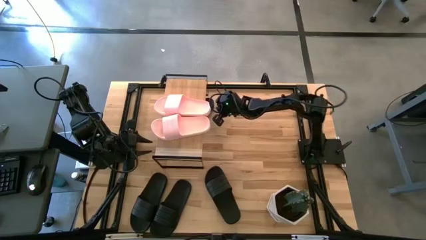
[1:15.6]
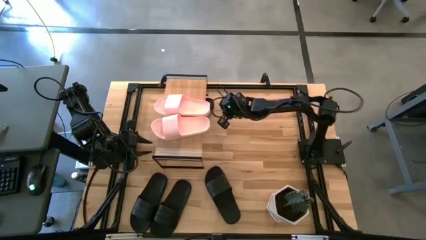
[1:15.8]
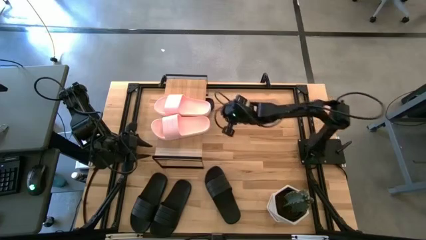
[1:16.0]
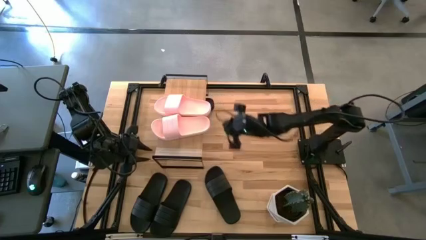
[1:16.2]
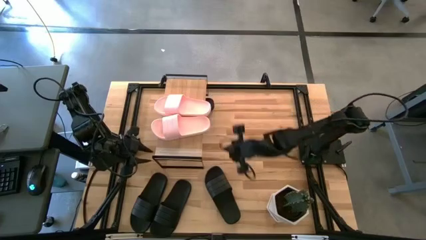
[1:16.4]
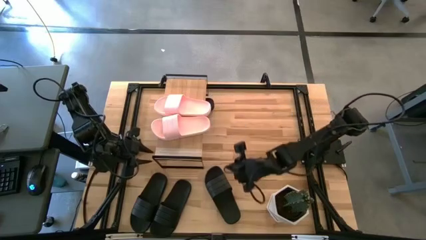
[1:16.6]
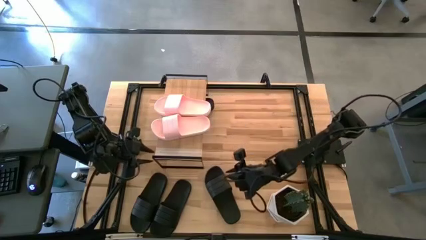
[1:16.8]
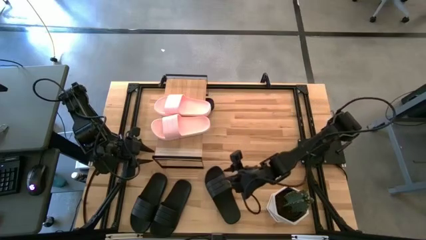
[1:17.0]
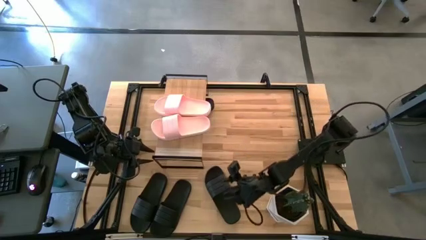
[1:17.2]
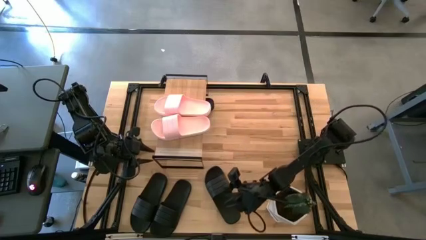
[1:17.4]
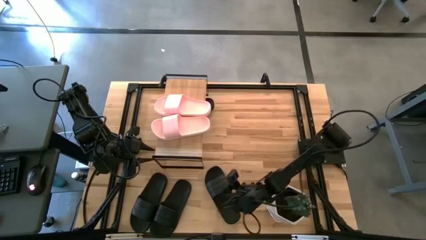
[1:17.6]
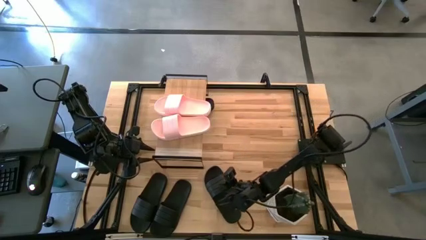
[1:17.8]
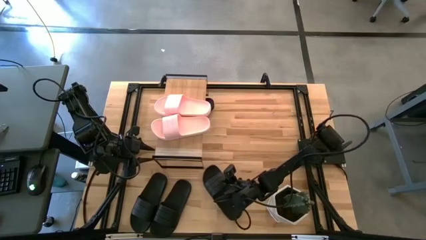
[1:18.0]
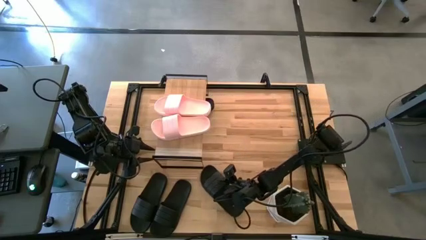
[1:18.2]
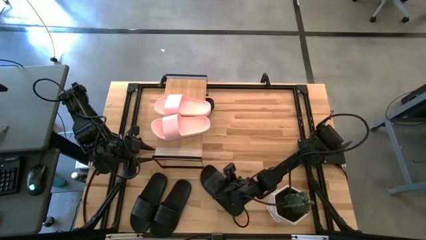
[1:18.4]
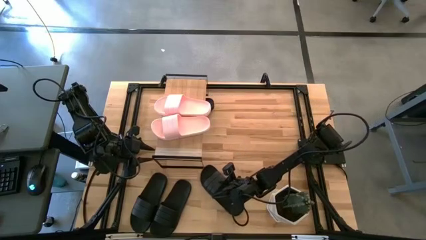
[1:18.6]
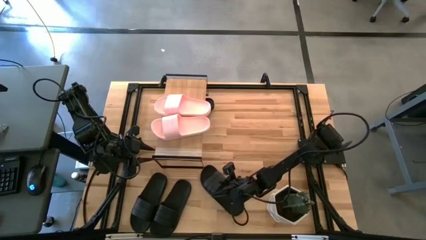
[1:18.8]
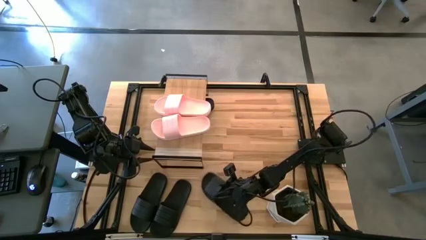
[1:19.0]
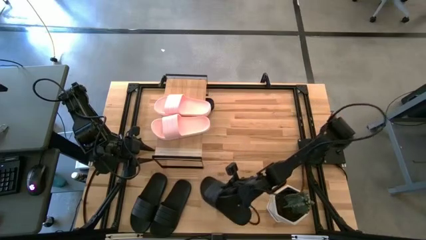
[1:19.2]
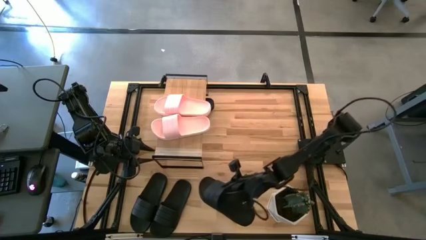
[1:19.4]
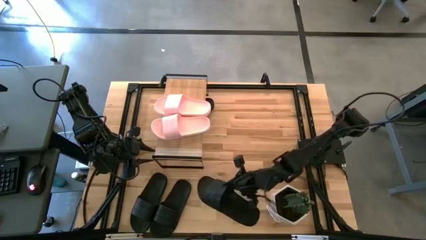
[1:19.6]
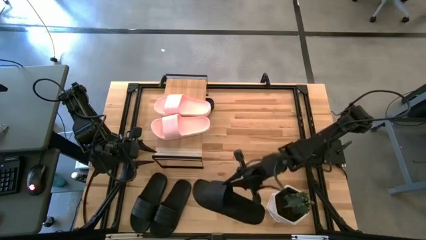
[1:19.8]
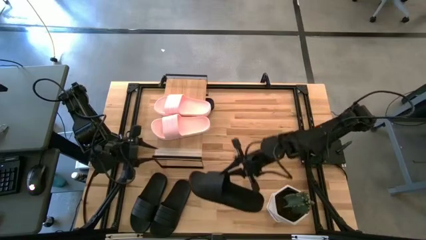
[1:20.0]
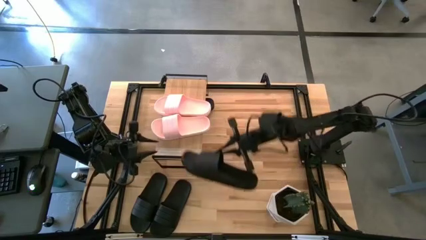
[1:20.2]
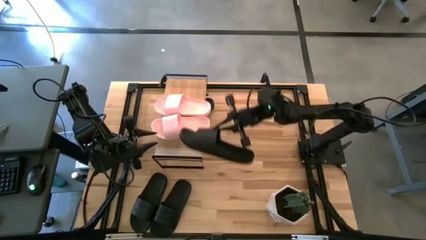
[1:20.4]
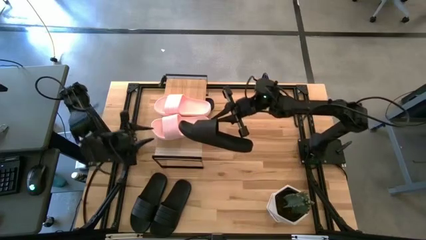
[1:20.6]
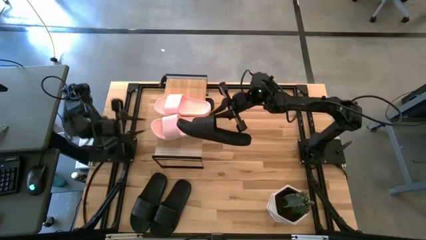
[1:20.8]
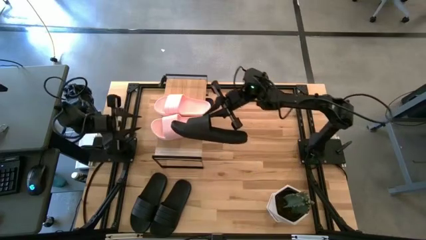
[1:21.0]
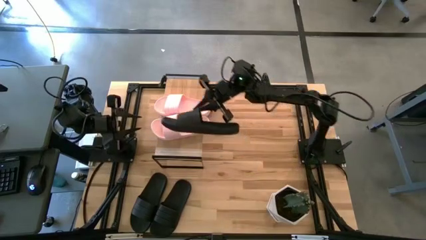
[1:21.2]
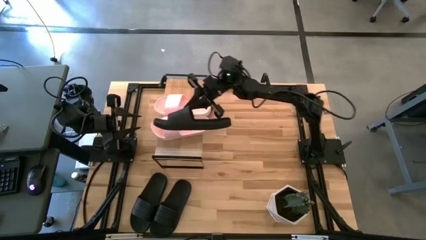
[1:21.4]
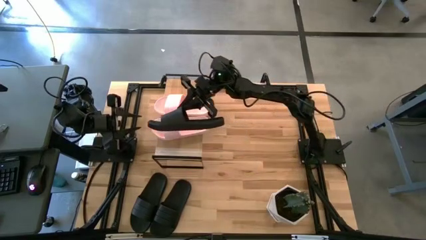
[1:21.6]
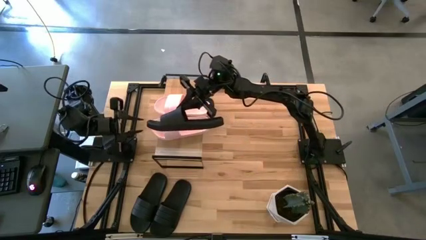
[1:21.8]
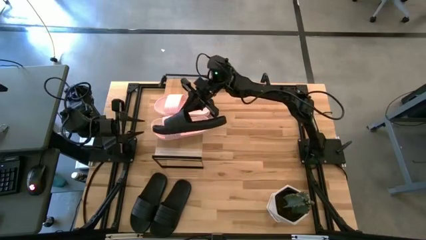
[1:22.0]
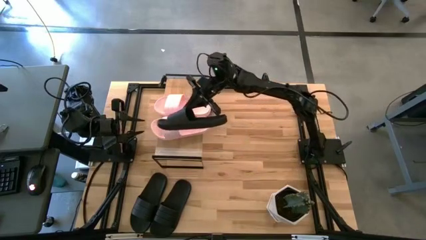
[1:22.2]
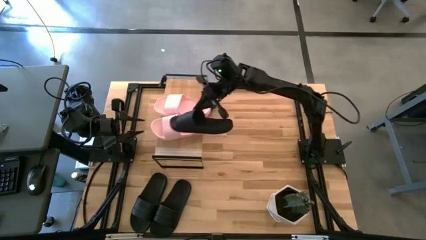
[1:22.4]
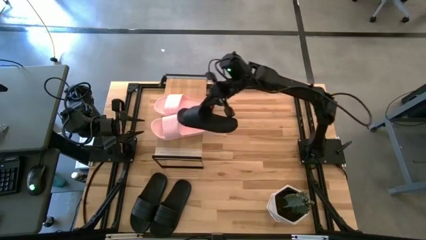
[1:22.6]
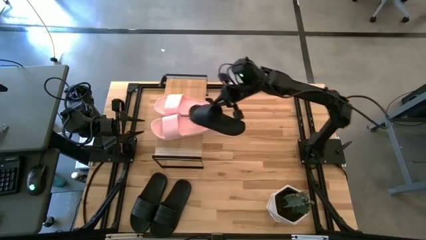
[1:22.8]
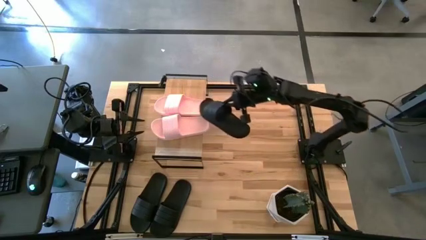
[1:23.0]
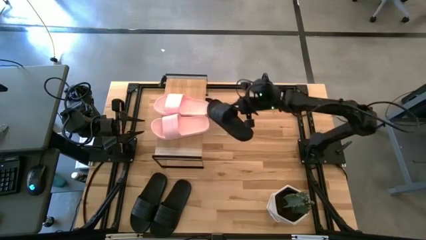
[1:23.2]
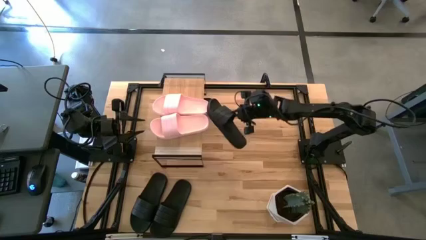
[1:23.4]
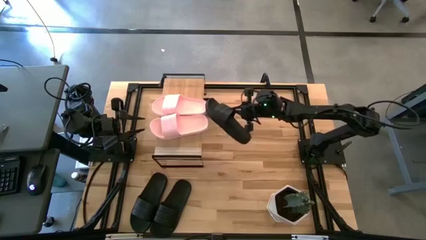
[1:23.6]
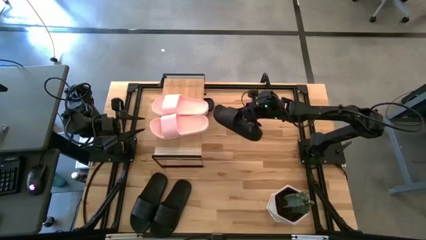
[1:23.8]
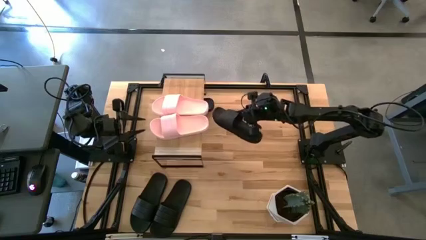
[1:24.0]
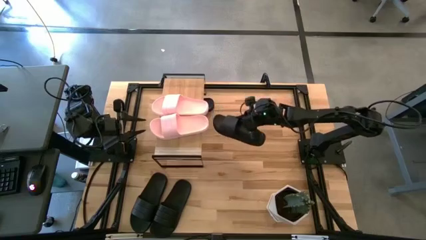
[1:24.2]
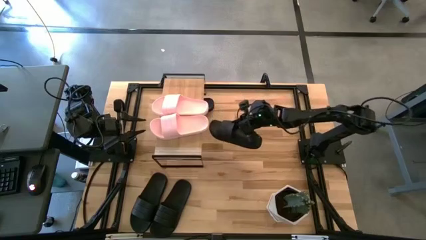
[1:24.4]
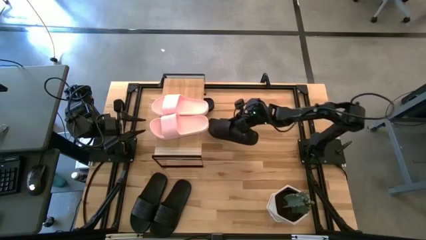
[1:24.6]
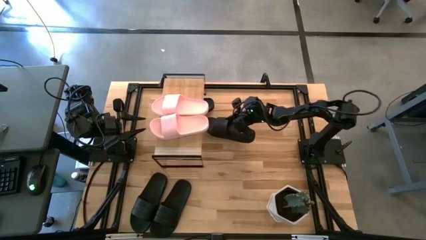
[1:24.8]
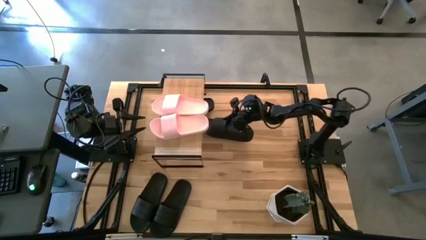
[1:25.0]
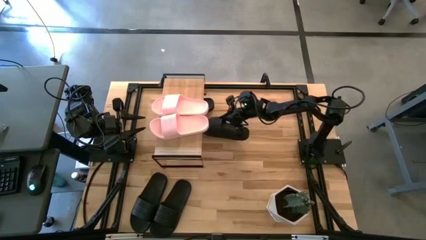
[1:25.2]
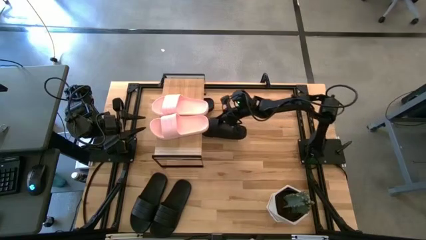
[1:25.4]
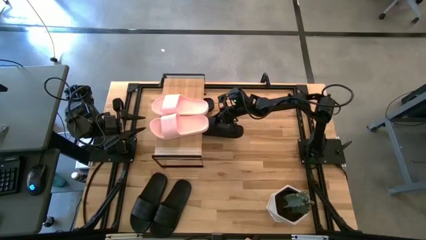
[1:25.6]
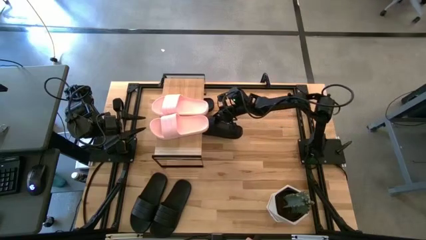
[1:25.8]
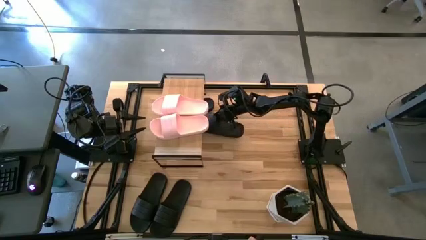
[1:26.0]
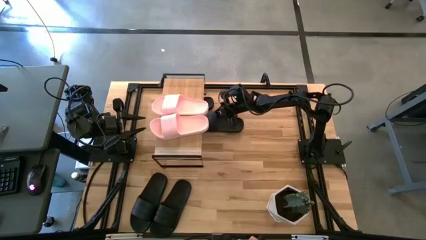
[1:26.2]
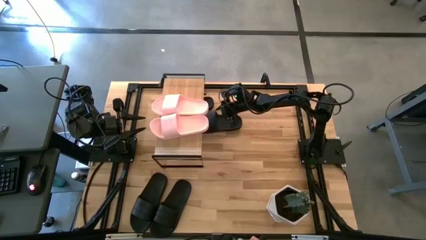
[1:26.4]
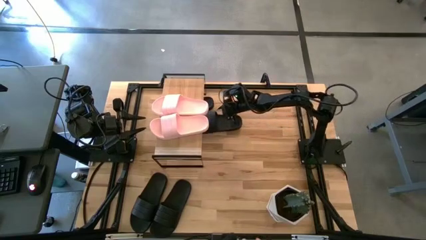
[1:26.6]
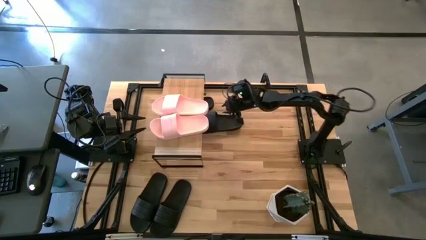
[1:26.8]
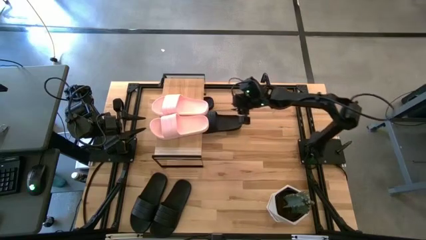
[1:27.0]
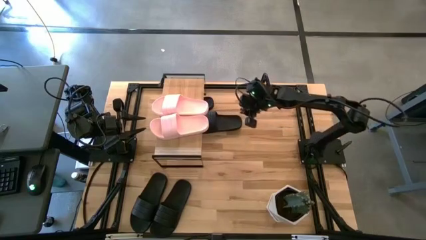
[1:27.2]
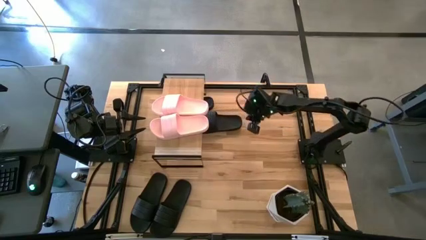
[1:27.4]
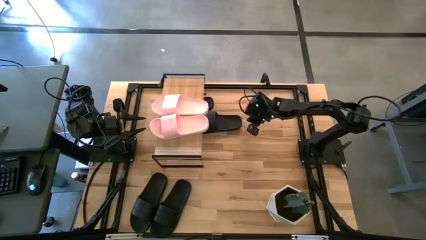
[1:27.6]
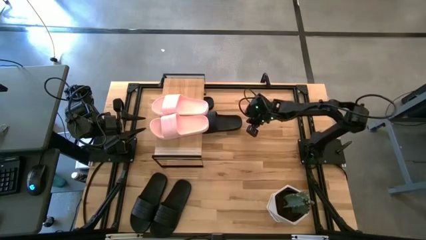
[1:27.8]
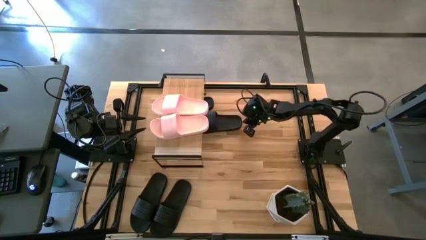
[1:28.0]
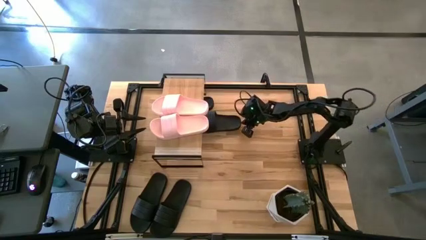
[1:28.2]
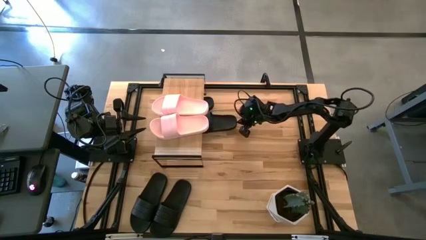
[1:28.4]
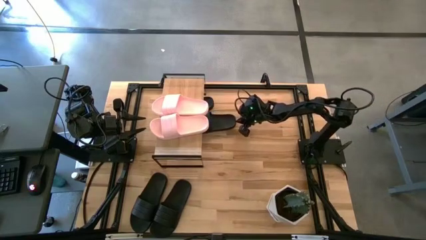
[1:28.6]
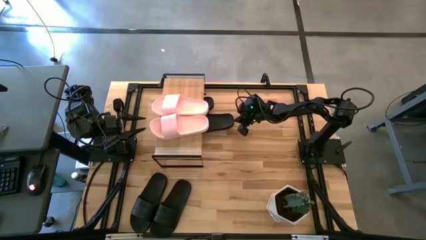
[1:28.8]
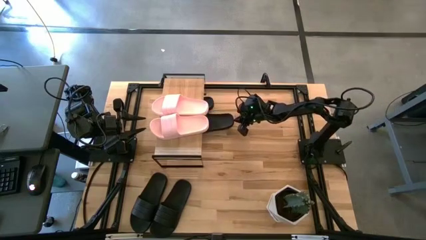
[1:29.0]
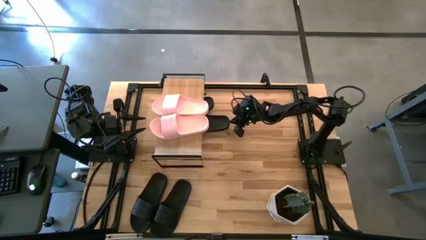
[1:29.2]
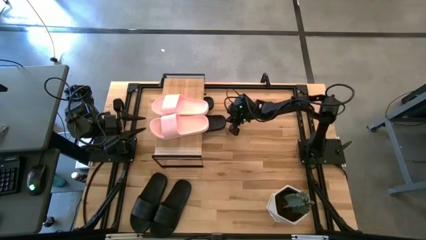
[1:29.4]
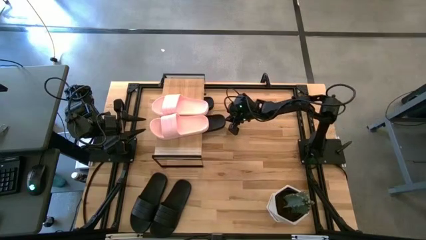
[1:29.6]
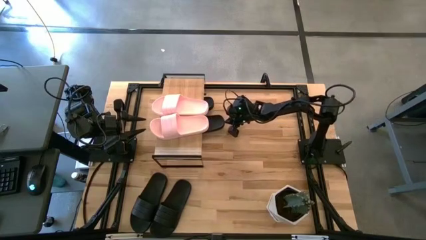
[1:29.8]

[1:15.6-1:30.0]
Task: Pick and place slides into the shelf
Put the black slide under the shelf
